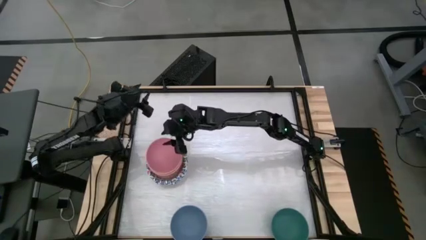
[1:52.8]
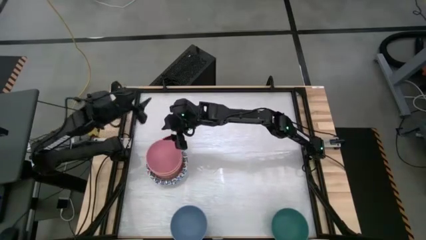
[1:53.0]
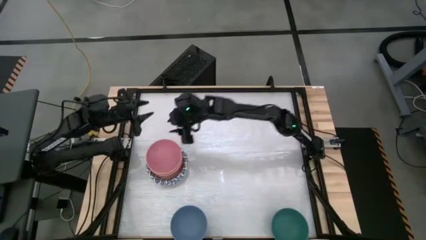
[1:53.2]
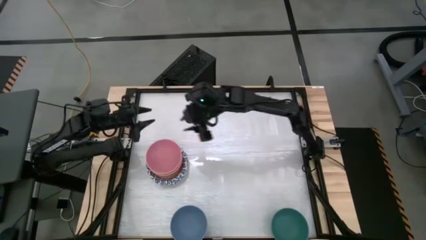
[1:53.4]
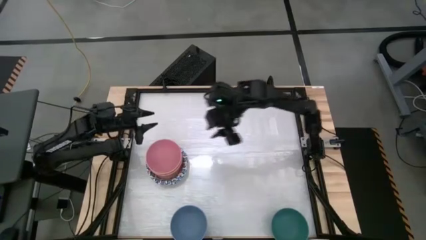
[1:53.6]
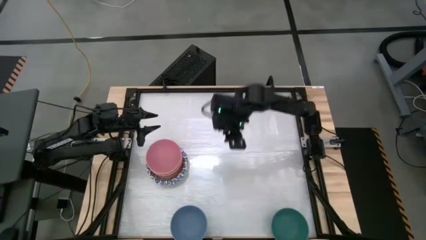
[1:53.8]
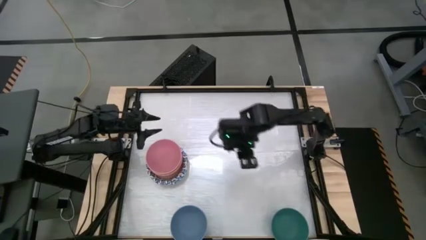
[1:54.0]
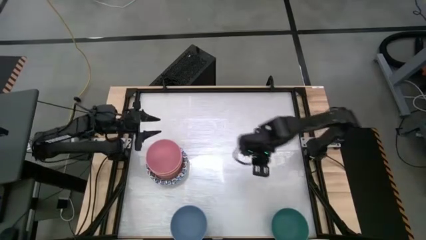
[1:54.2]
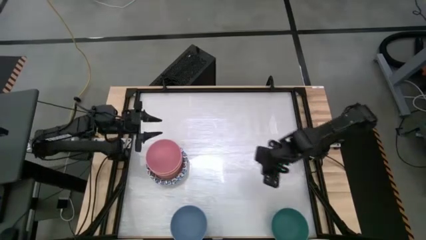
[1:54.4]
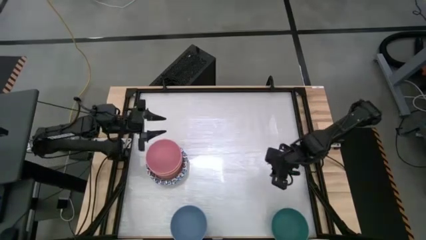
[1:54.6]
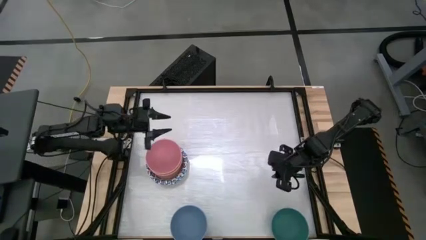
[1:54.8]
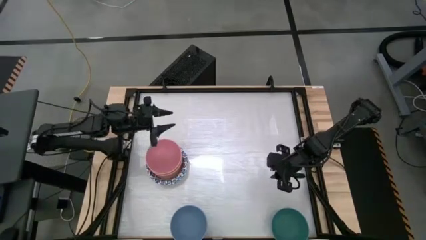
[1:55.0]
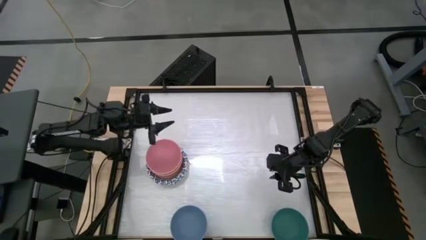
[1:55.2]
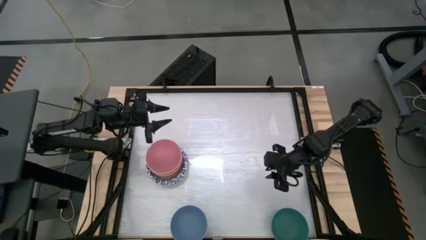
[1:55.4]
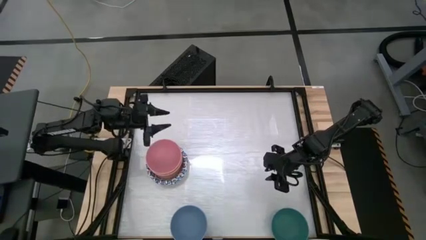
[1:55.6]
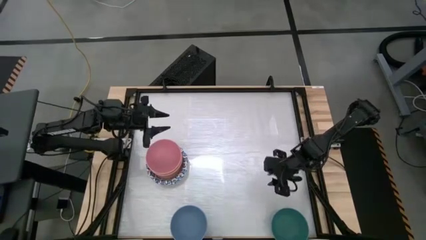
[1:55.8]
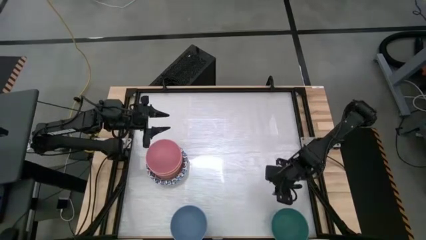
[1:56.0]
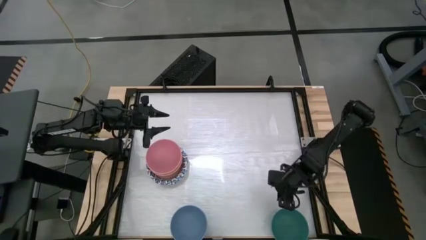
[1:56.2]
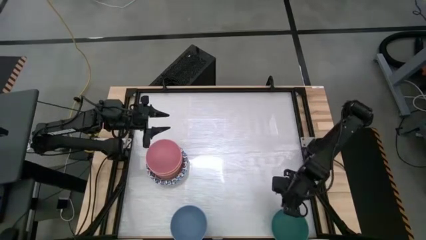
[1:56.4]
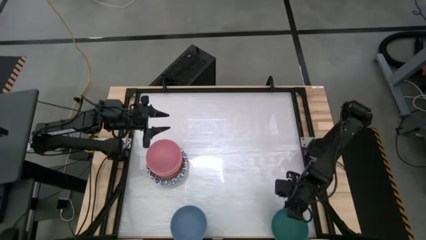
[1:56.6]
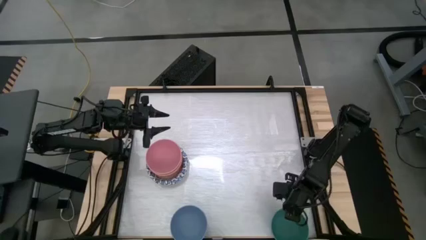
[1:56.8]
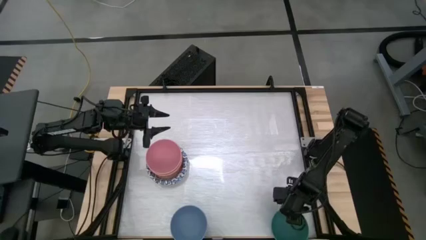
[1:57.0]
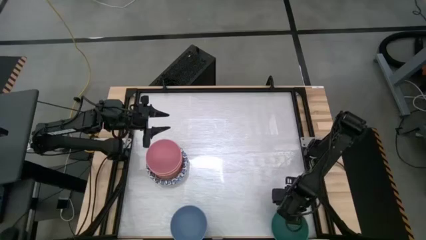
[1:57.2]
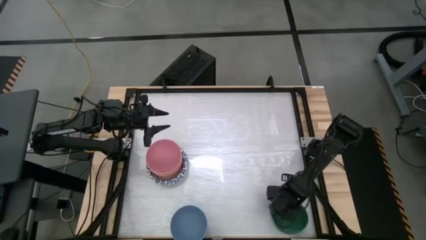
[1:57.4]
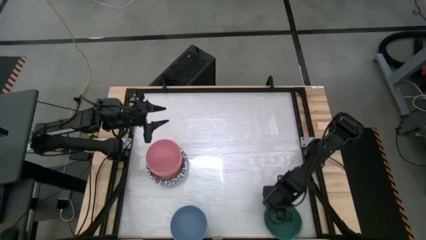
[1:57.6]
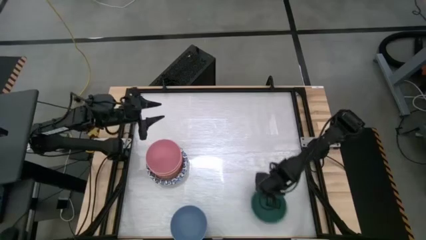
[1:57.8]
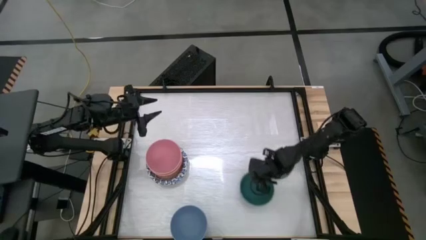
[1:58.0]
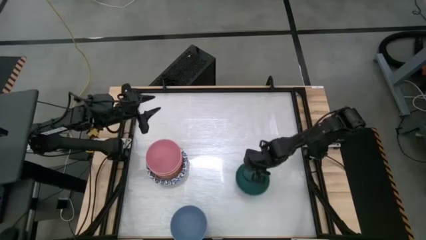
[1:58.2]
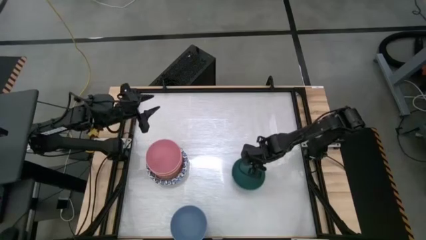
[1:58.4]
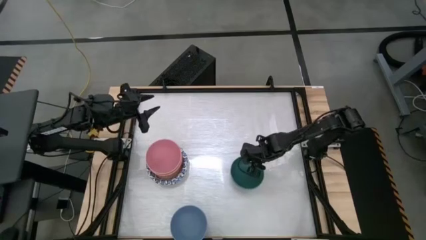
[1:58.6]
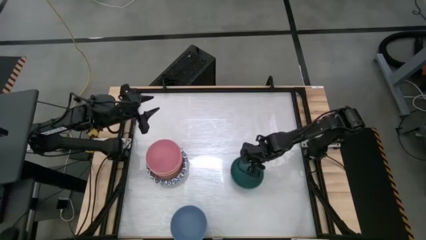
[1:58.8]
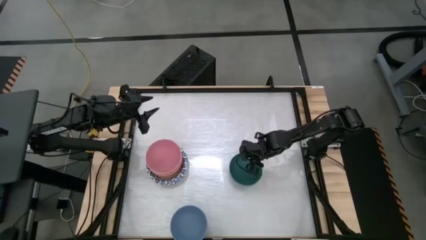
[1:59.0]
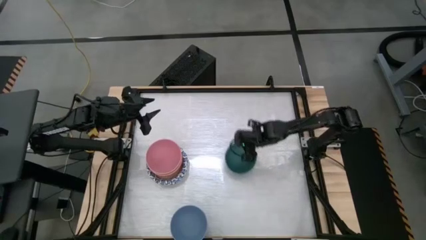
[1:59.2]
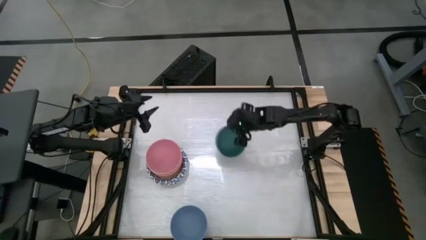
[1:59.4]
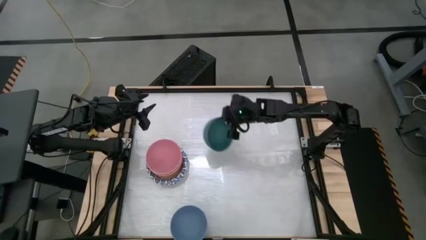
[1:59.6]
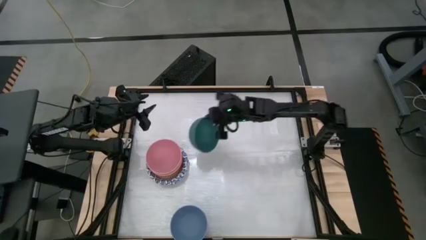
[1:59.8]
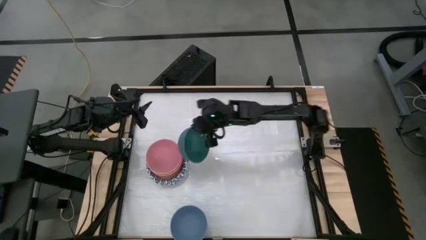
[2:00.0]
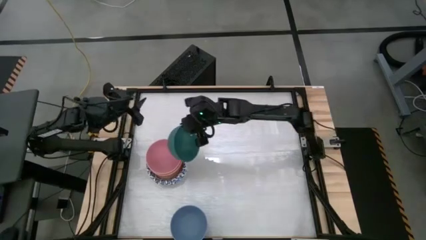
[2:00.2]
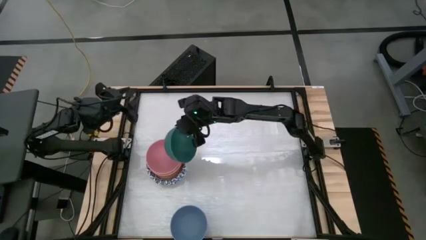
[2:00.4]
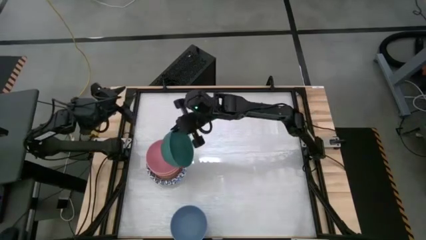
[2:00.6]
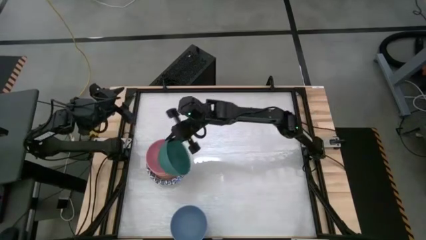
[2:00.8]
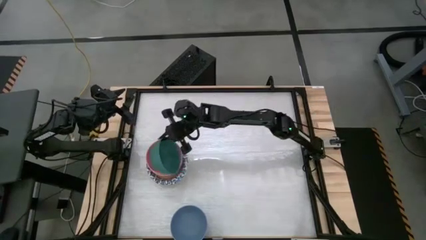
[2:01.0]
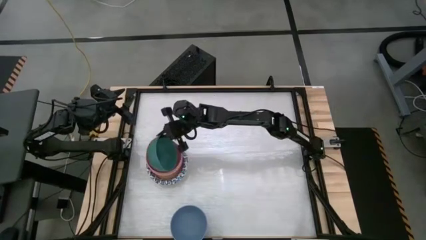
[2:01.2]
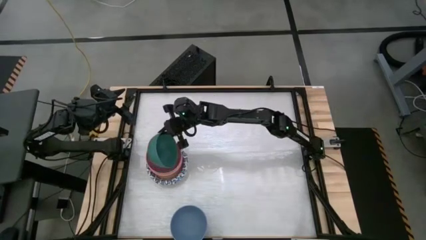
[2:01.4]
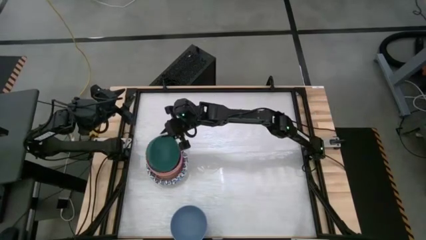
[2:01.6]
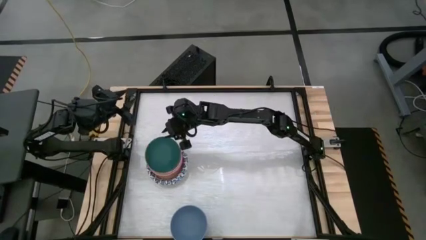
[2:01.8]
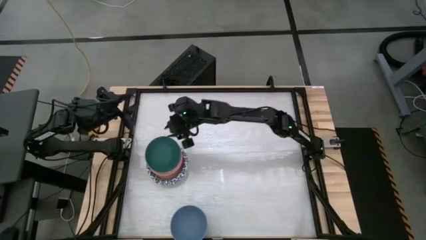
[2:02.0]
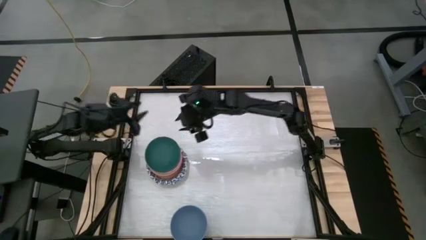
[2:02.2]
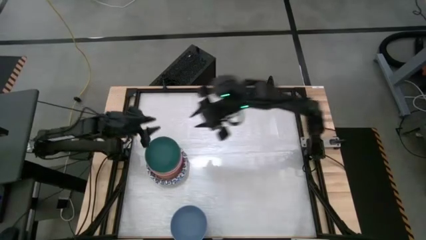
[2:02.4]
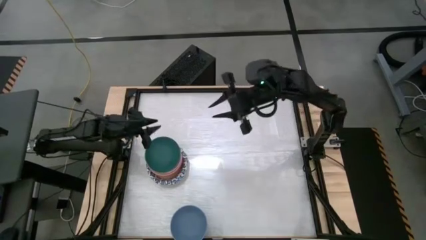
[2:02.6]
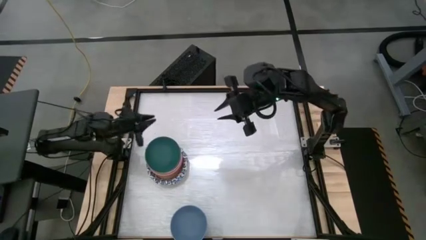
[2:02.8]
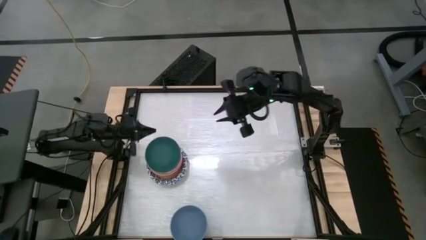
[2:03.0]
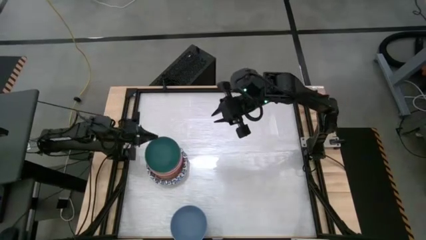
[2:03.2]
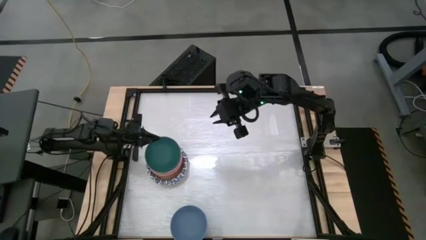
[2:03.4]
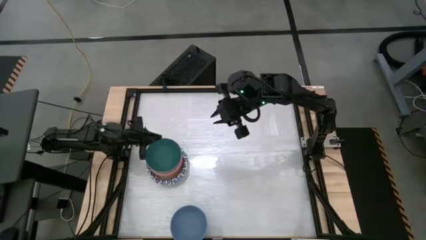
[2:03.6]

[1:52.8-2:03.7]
Stack the green bowl into the pink bowl

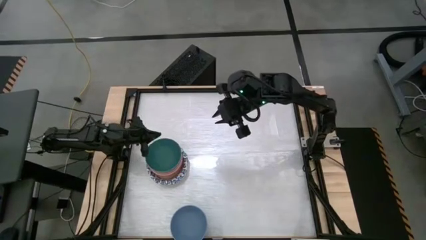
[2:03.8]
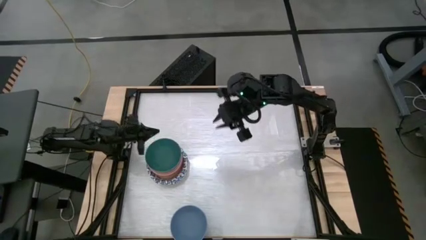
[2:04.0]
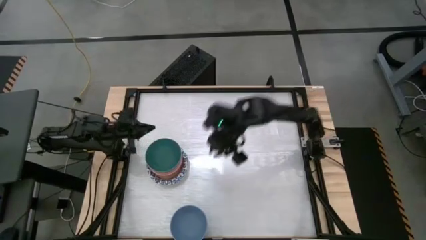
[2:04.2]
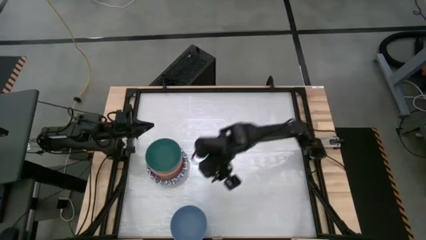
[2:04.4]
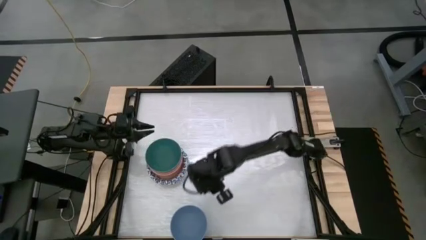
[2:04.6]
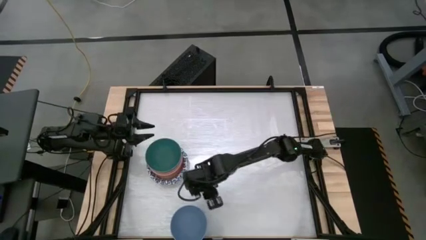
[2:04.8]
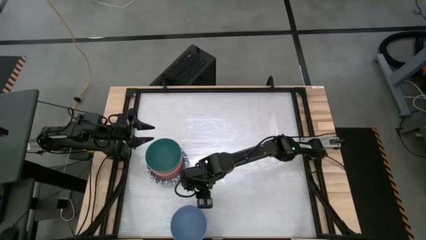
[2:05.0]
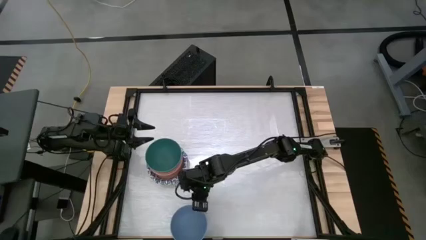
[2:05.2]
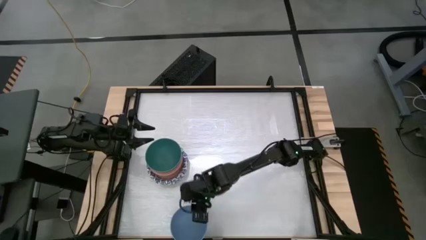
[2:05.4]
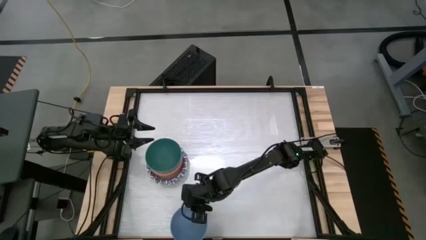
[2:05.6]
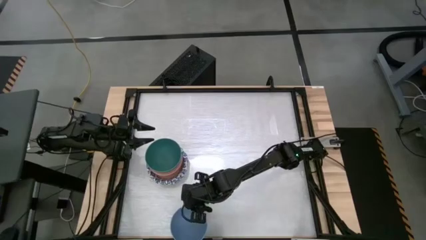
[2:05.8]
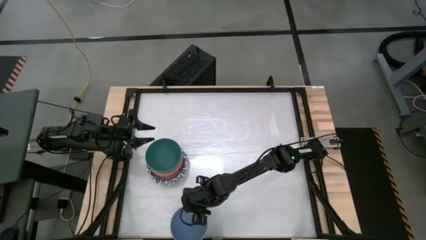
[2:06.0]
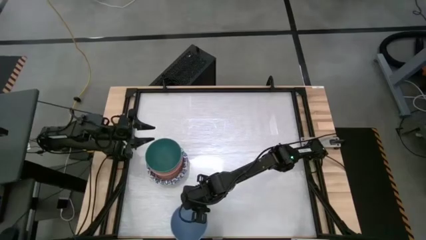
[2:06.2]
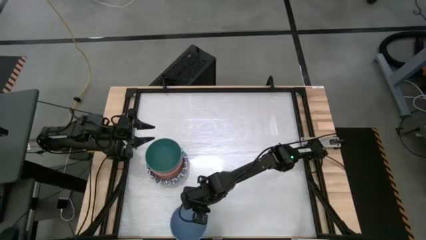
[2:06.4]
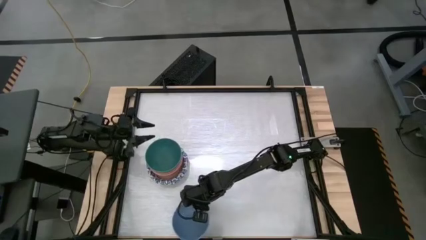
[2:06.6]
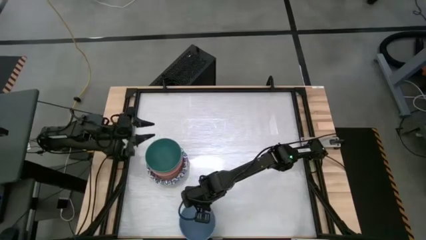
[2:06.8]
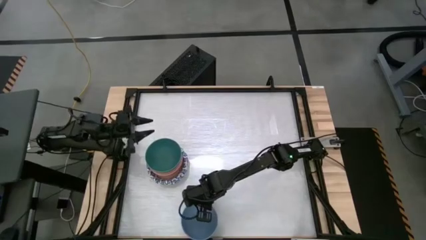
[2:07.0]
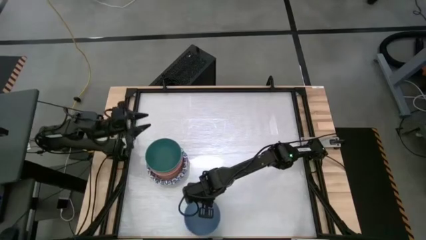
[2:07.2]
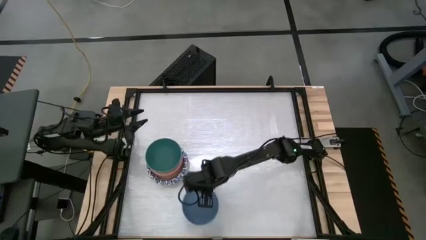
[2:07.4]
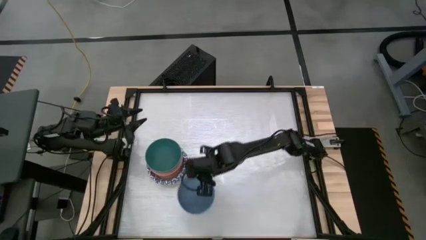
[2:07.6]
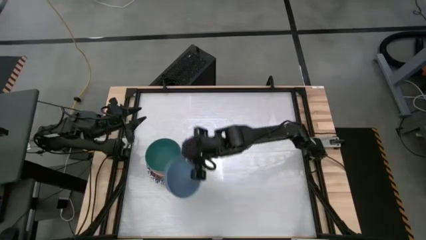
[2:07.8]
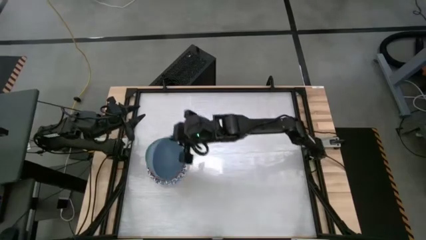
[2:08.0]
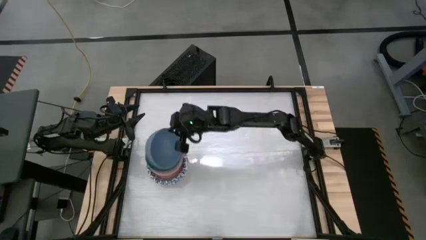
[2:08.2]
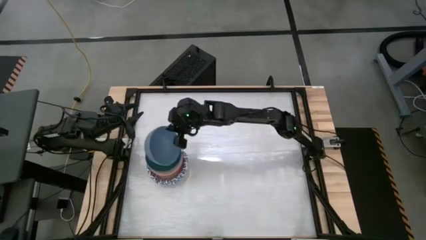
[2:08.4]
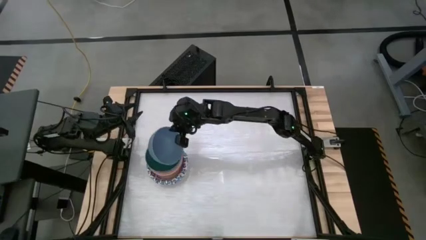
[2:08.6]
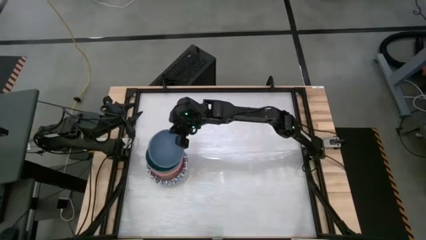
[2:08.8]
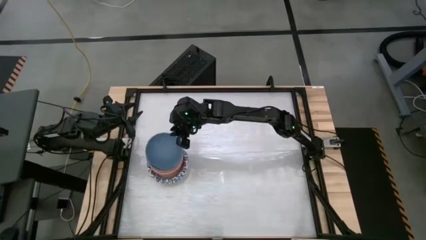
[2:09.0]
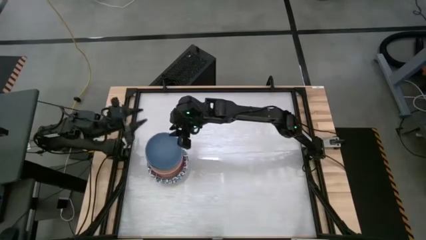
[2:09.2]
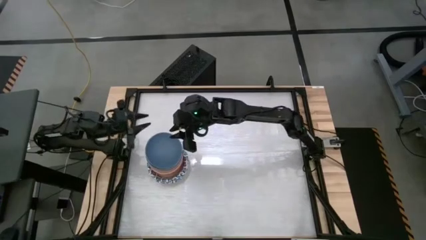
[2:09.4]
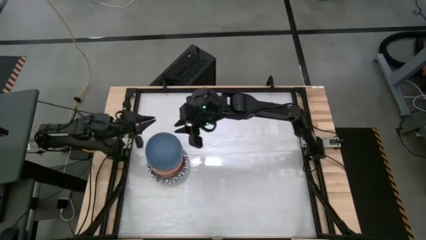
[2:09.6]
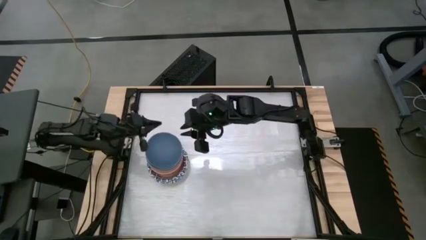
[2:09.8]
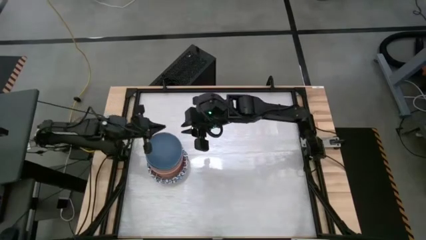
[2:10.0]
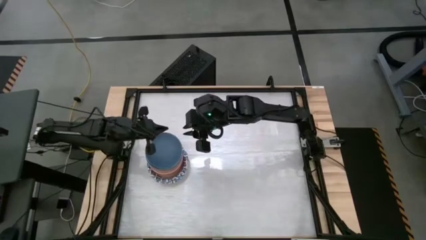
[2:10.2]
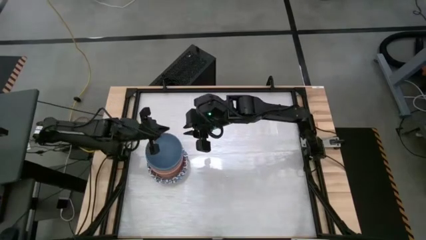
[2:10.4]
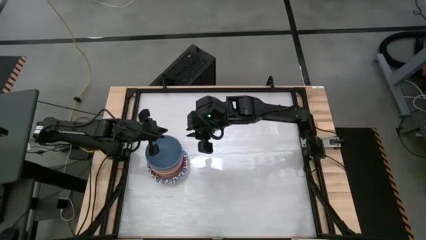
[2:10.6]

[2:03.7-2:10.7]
Stack the blue bowl into the blue bowl
